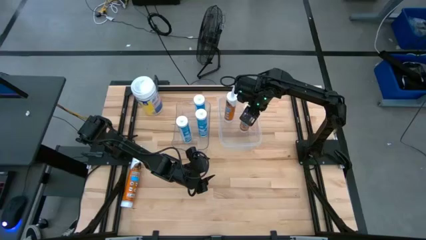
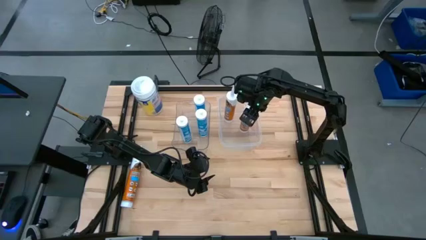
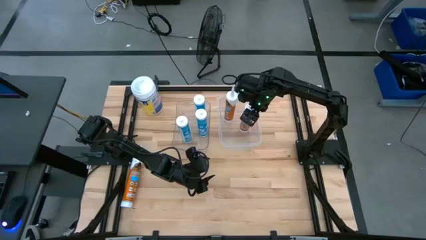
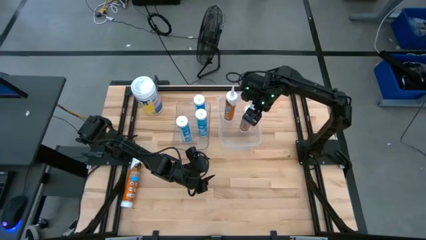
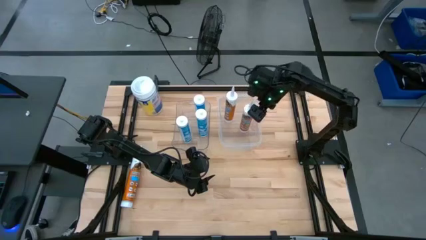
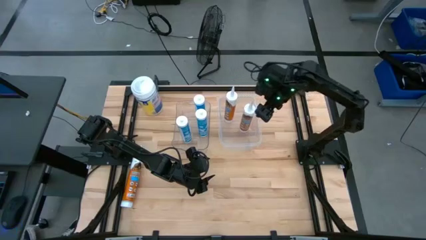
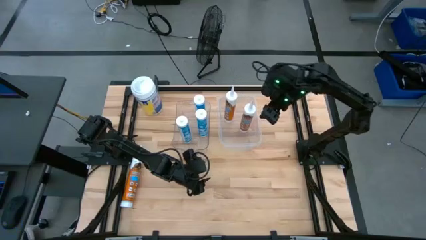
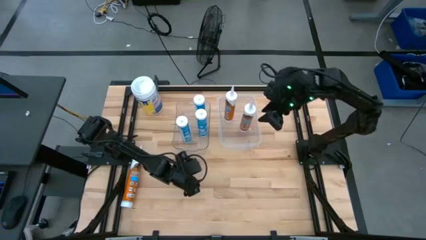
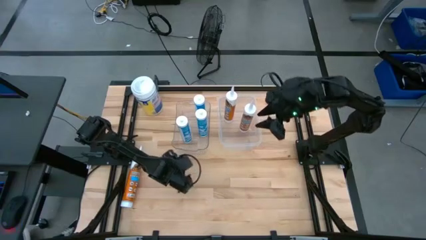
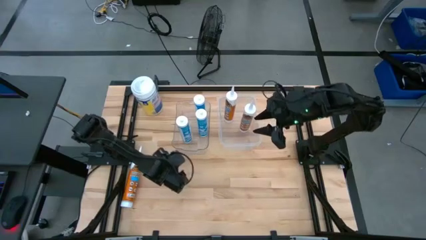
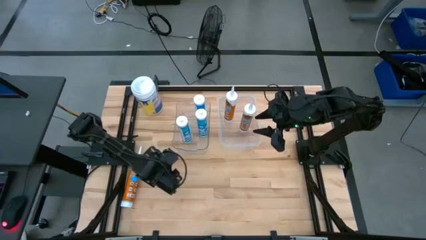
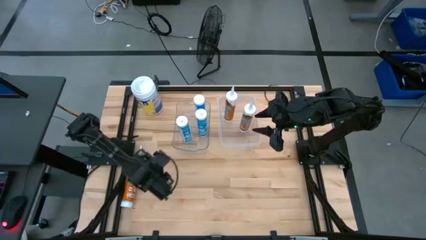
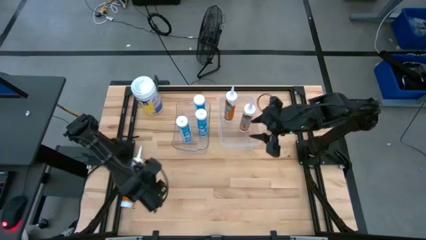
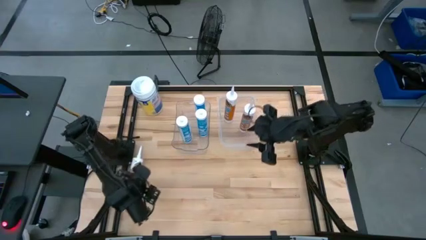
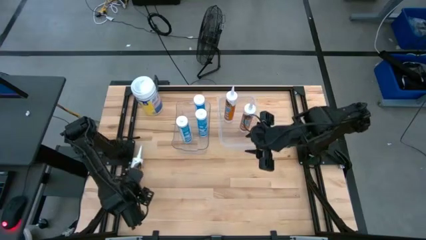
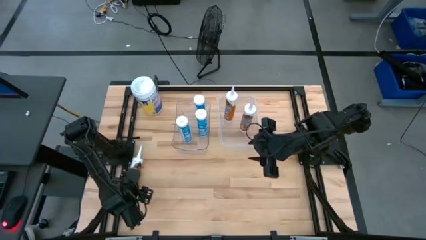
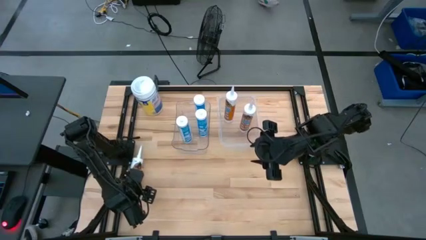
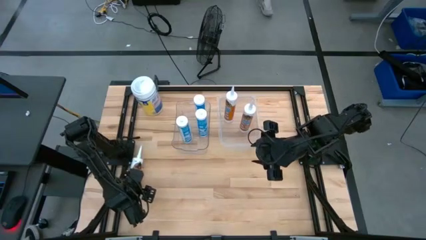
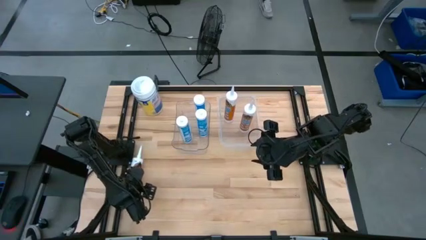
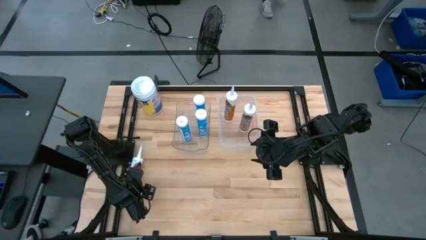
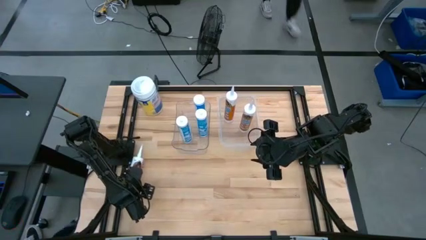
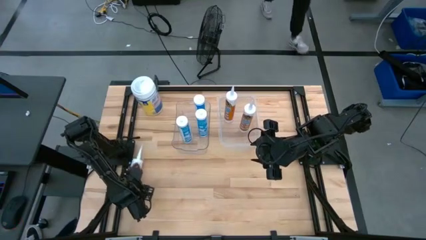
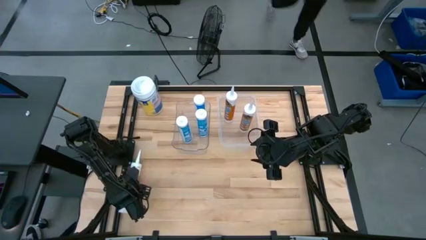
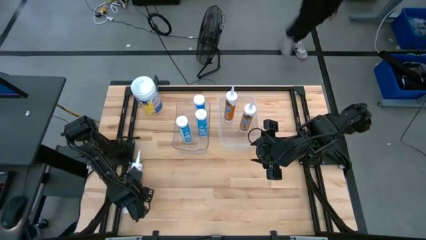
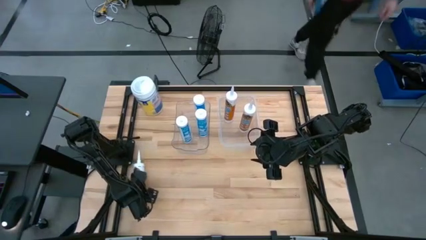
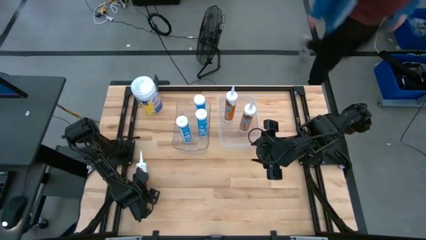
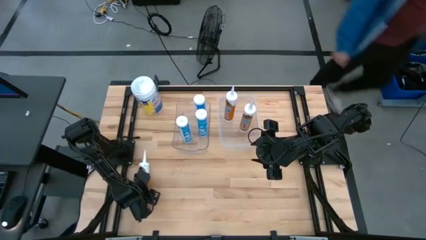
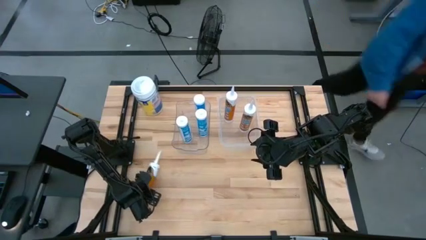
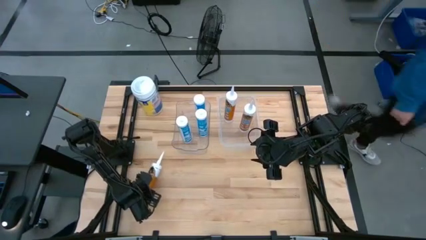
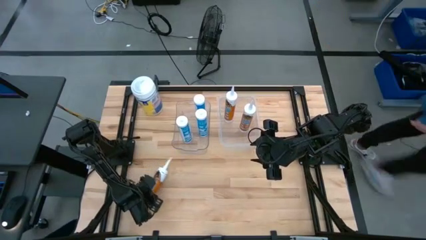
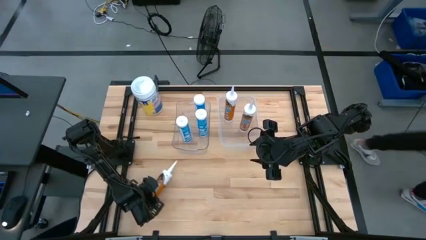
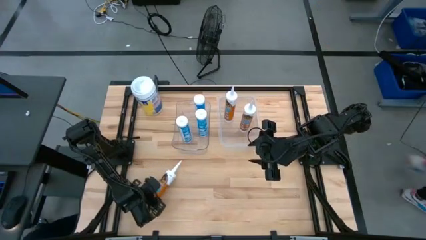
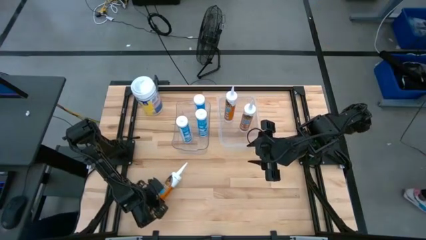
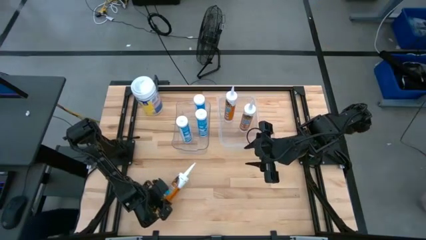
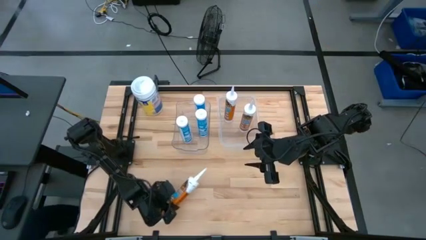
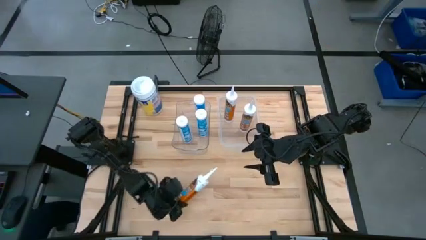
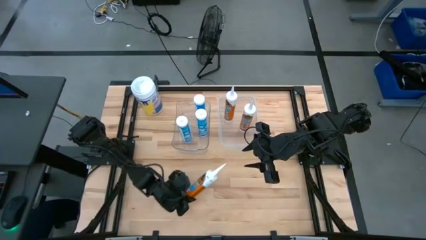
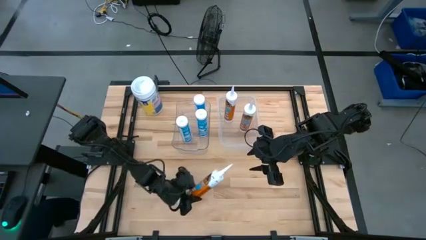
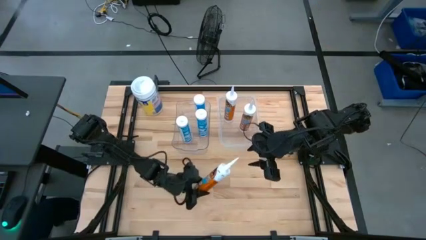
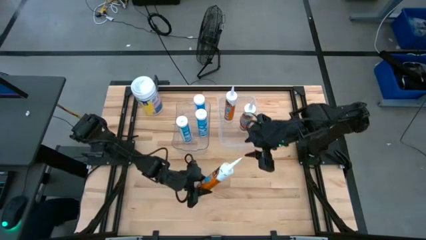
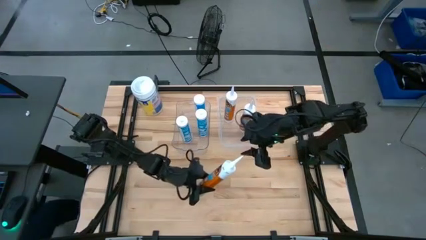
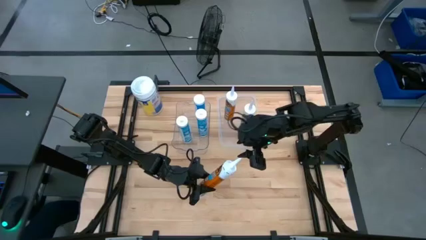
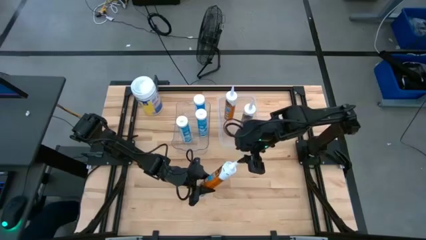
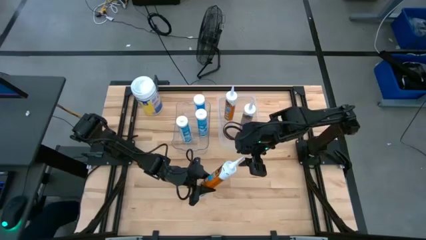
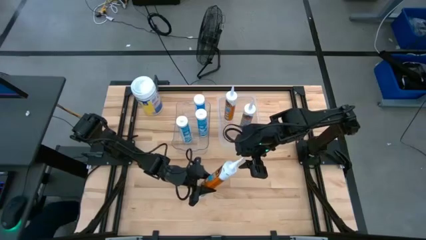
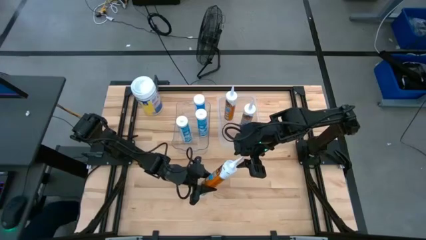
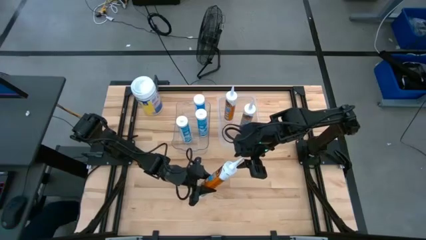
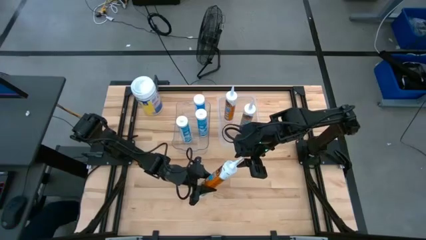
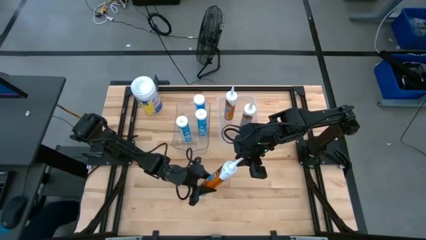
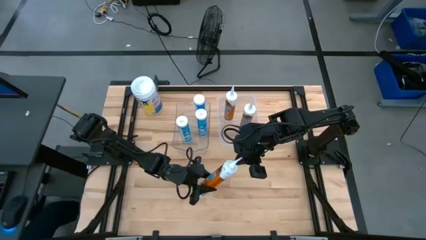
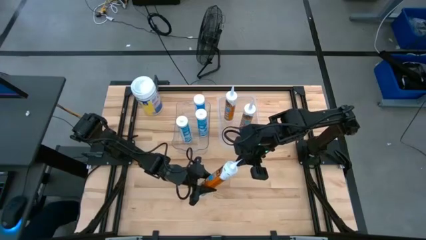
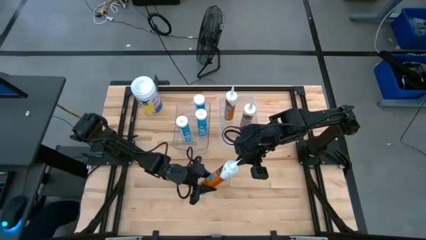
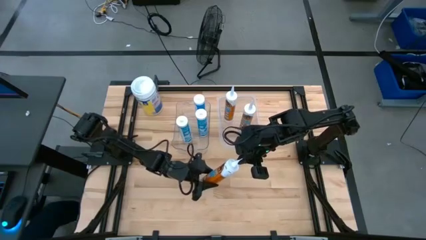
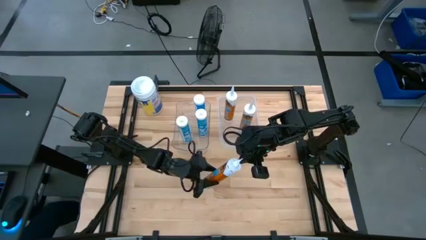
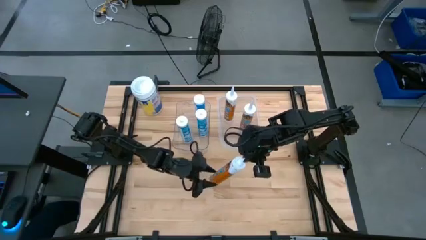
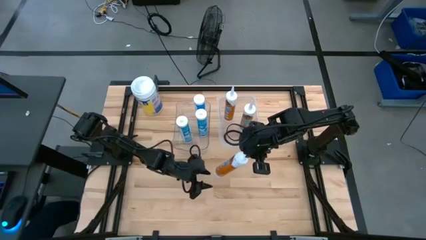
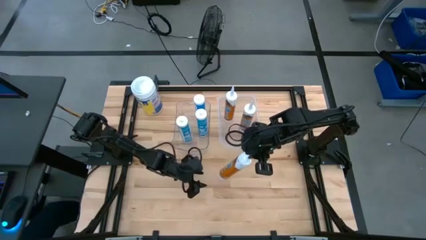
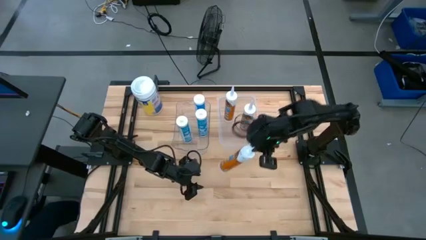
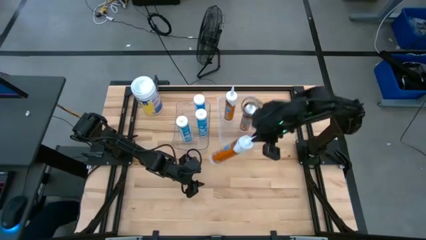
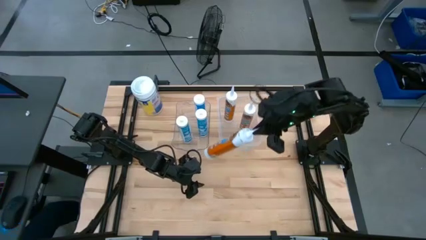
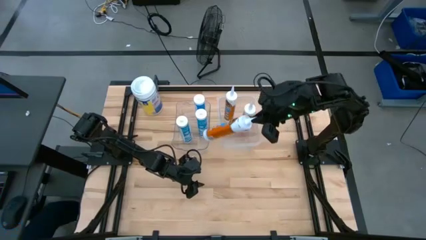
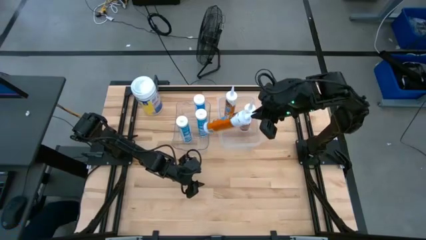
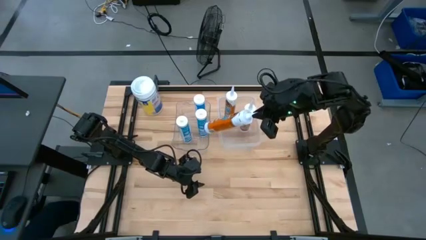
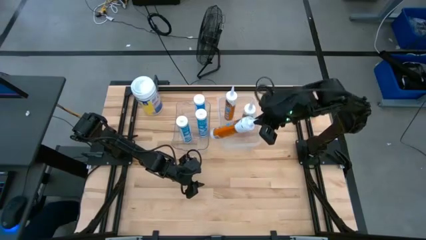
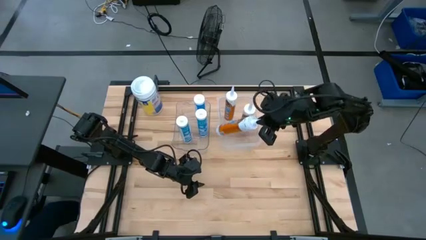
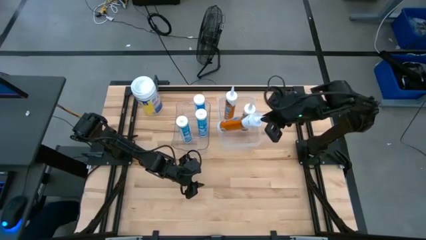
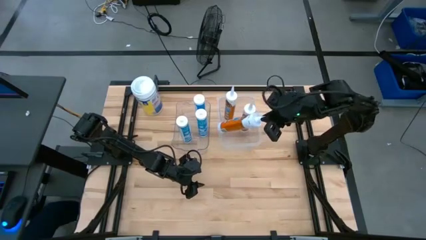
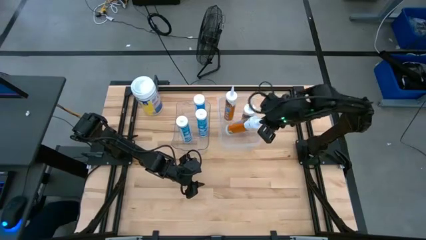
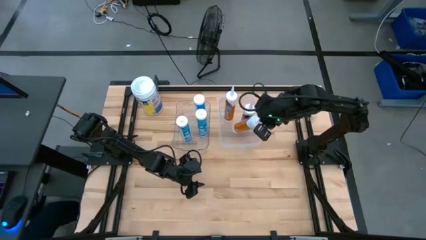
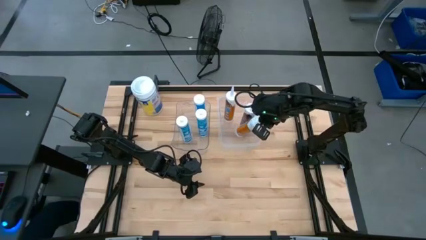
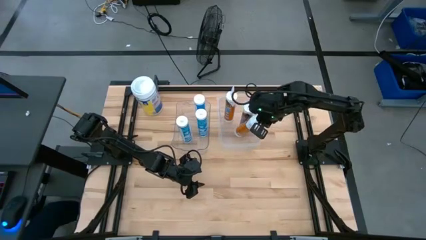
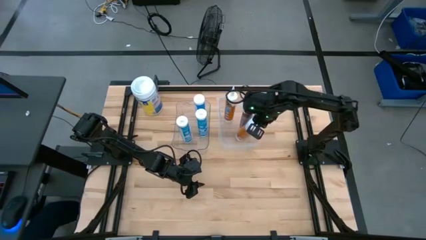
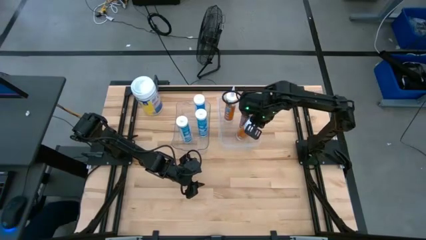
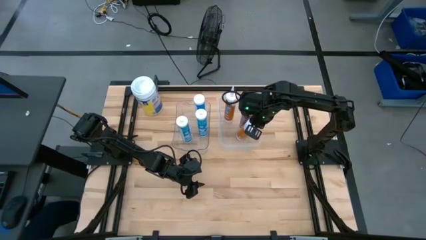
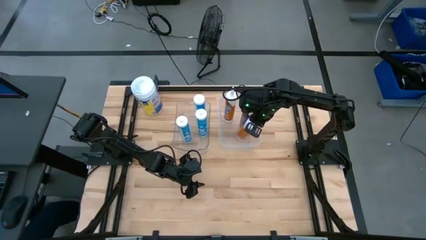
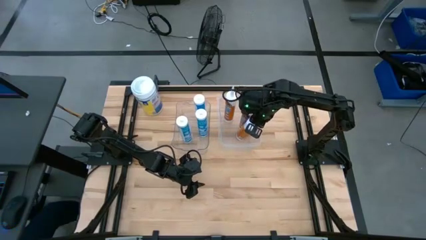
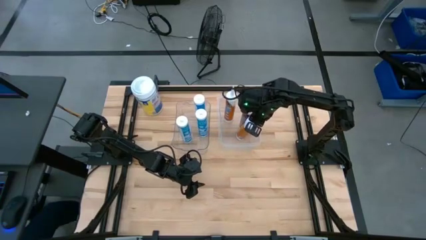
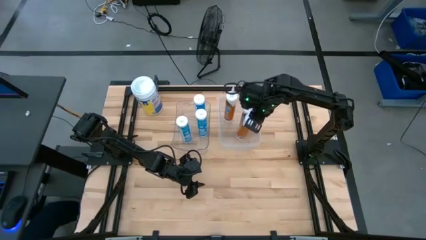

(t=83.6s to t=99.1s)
Task: Pick & place silicon tubes, Sealant and Lysol wipes
Put the orange sealant into the right transparent bin
